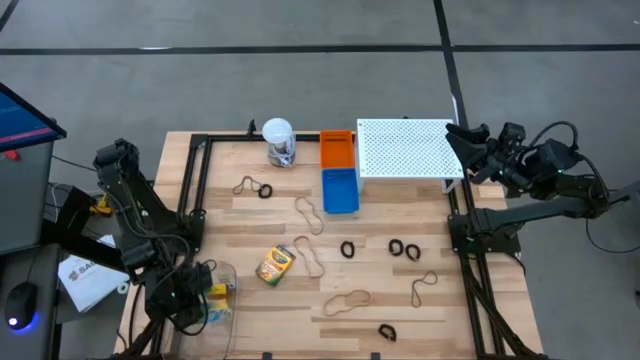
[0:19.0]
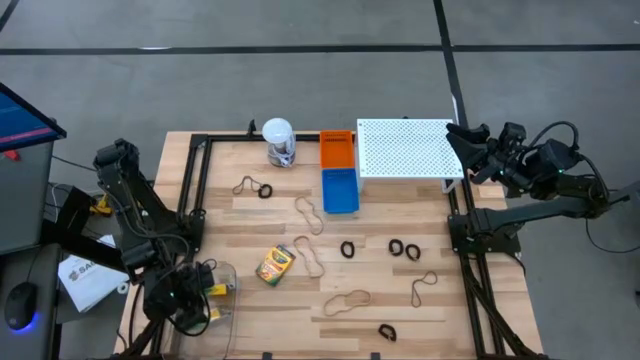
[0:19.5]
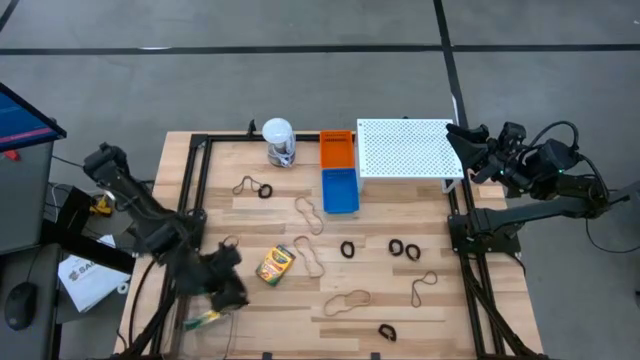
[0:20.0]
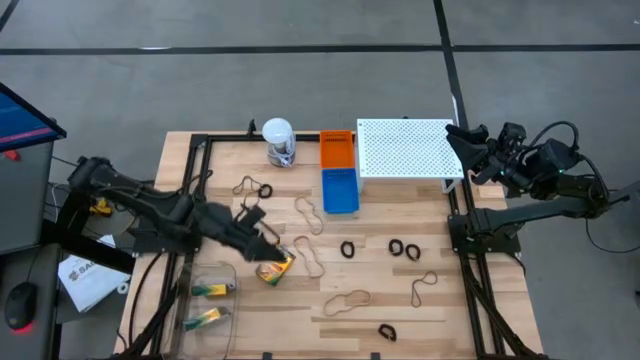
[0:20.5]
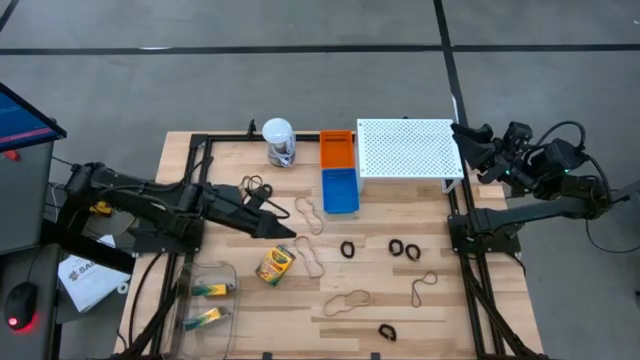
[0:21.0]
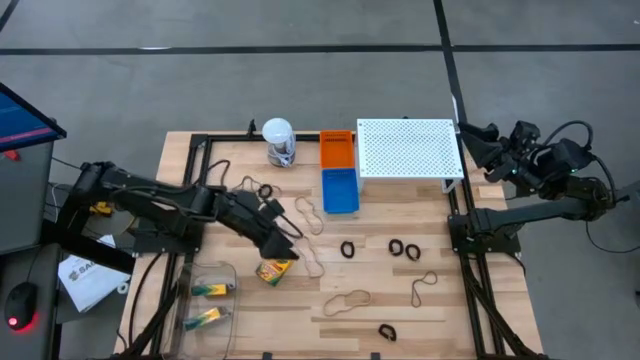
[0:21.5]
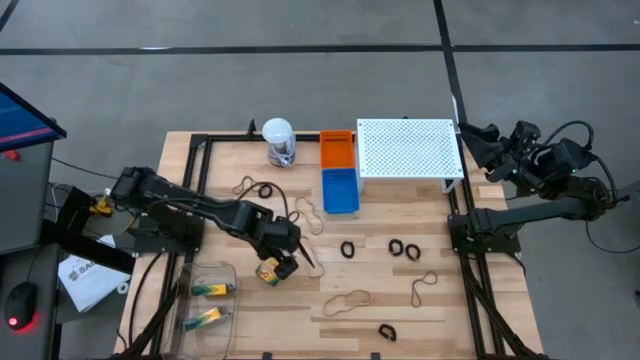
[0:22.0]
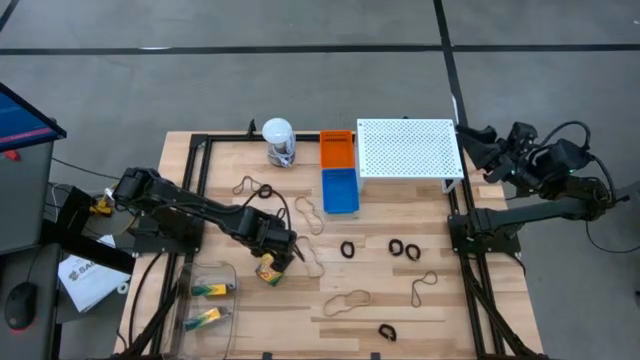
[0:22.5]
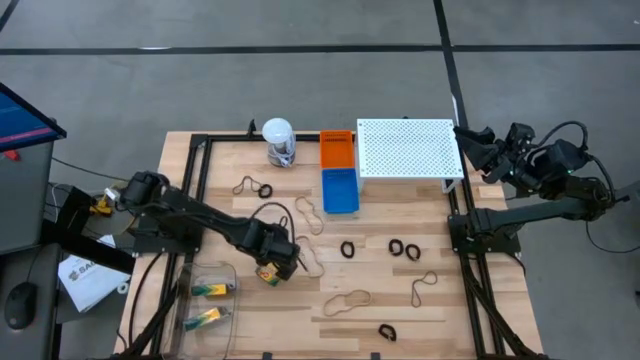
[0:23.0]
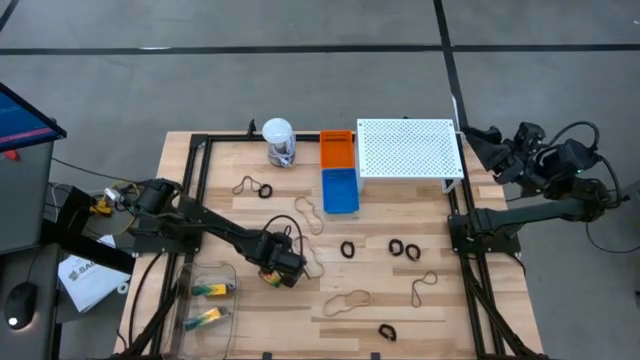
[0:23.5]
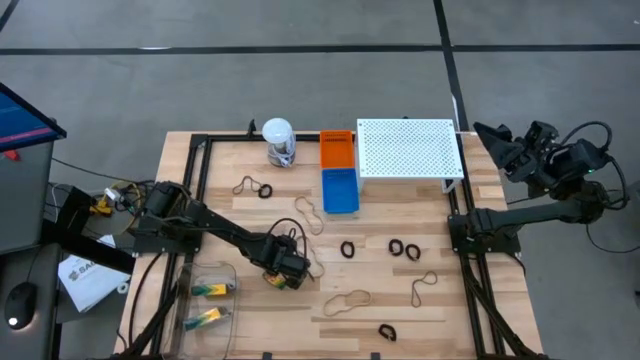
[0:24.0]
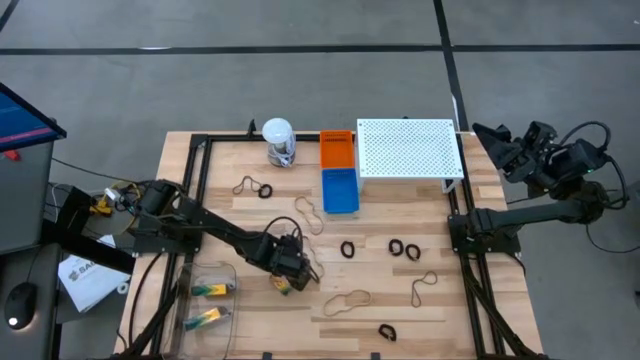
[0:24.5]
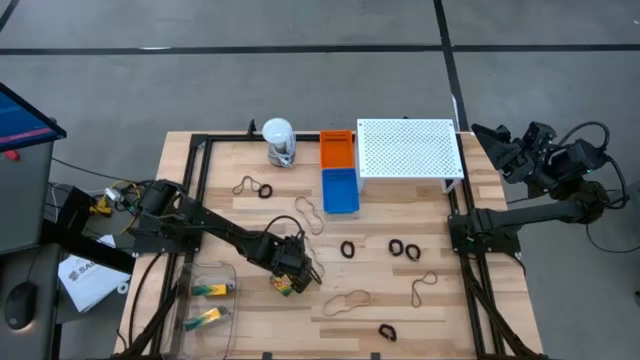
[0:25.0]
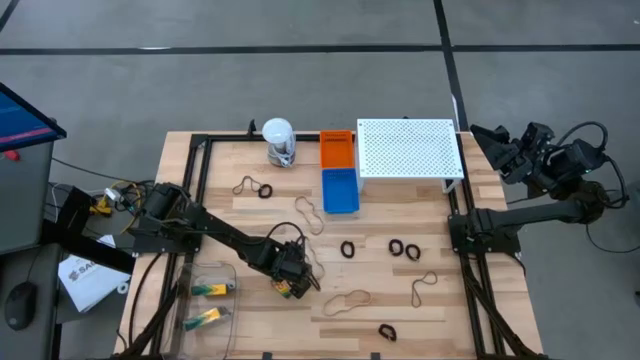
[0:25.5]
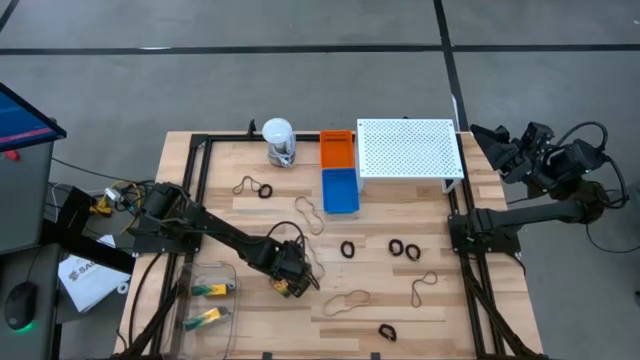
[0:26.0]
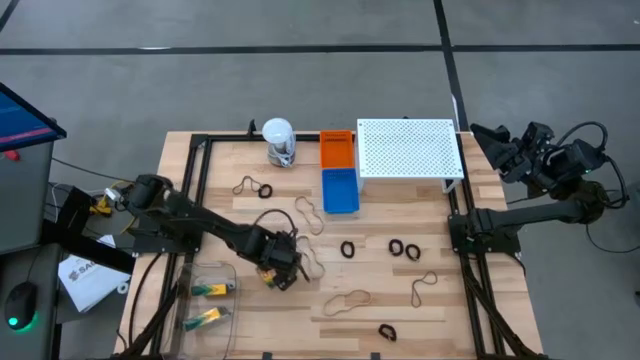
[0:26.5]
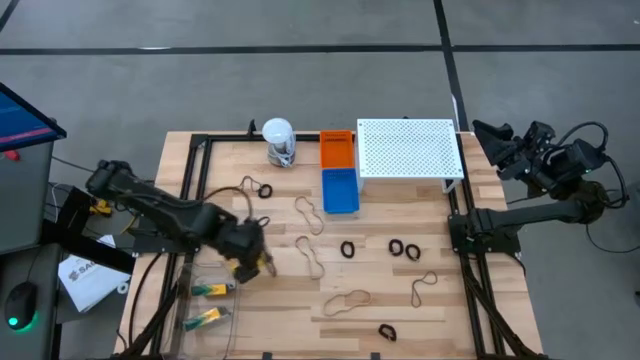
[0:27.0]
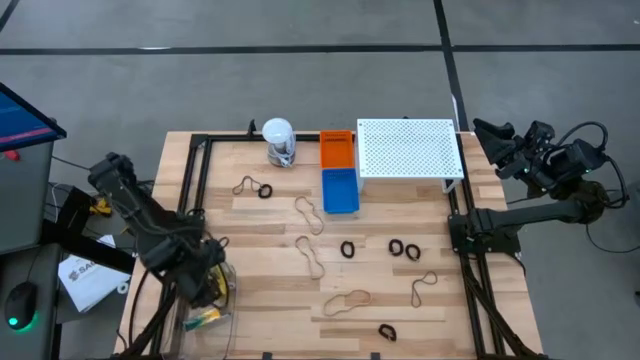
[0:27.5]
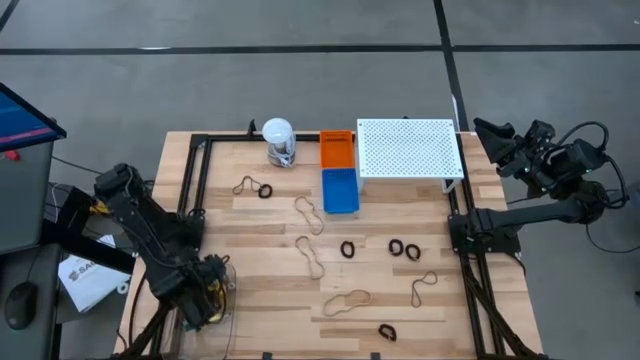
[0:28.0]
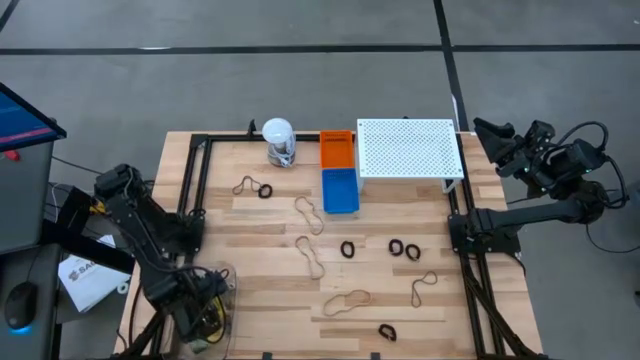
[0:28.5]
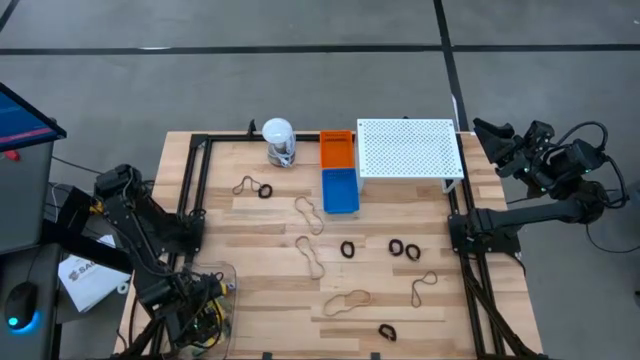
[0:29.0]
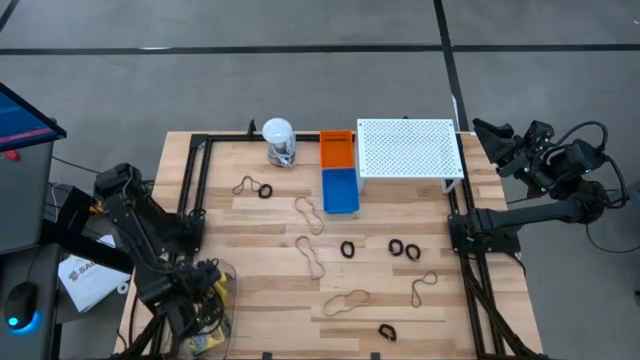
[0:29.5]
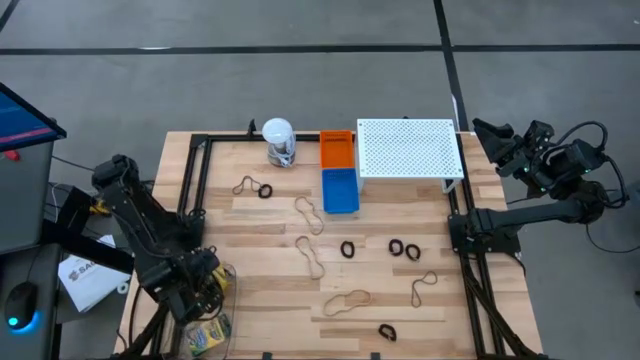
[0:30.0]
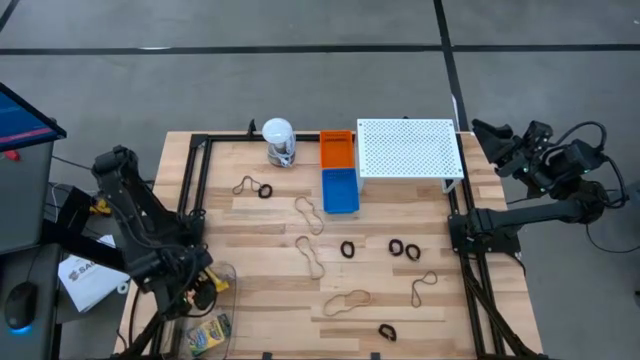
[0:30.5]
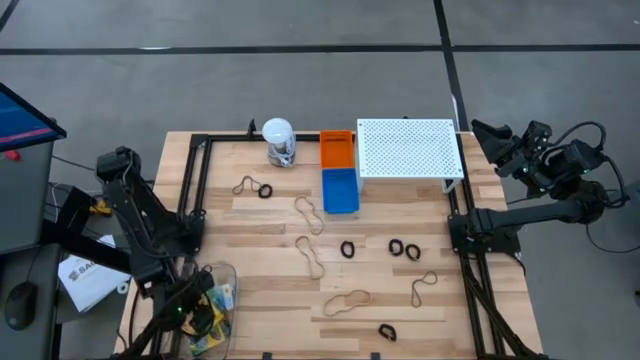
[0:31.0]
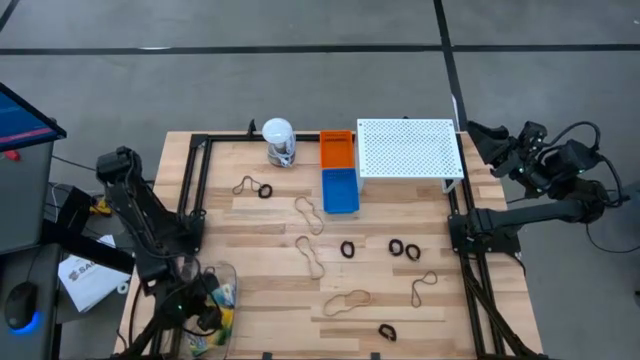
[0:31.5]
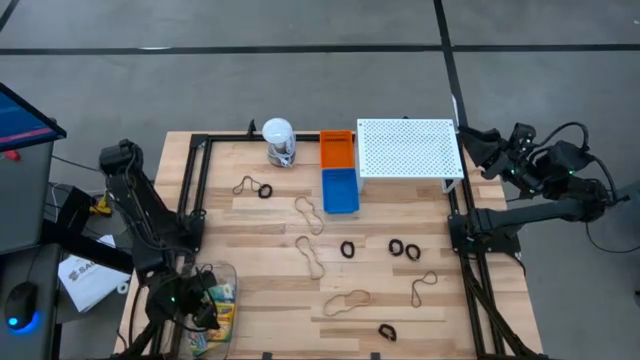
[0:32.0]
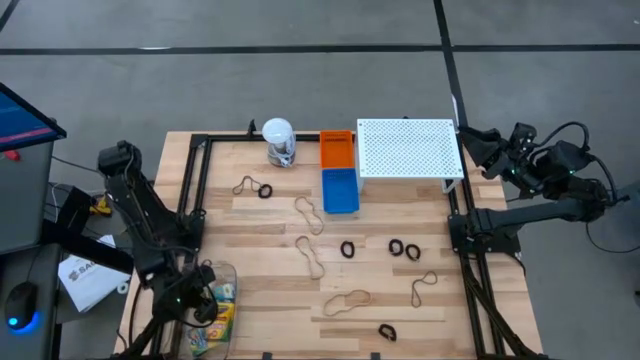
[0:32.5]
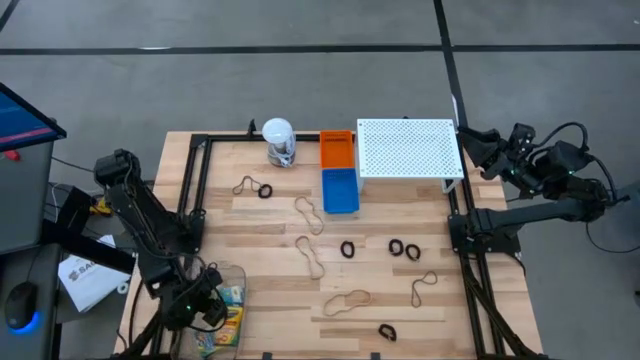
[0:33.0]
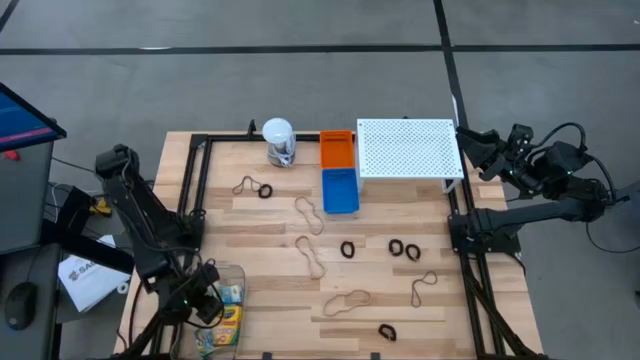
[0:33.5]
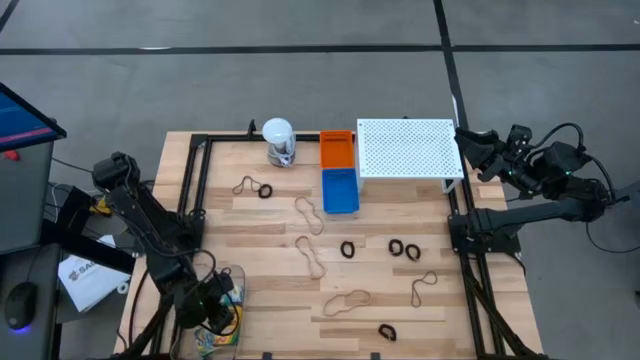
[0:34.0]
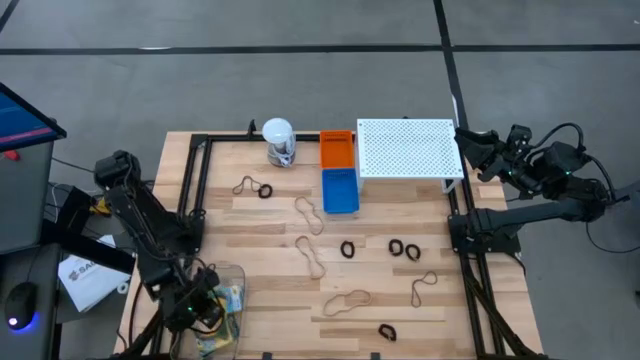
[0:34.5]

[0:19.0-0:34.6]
Task: Pick & Place Office Desk Supplies
Put the box of crayons into the transparent bin

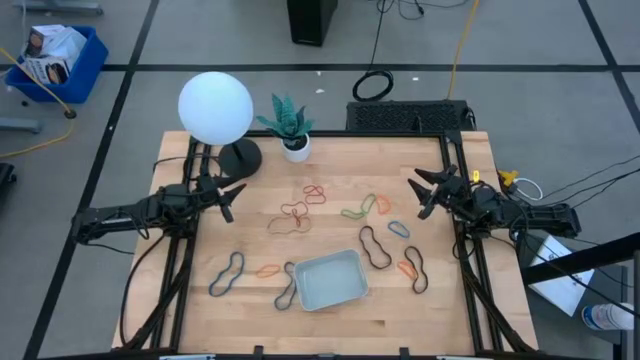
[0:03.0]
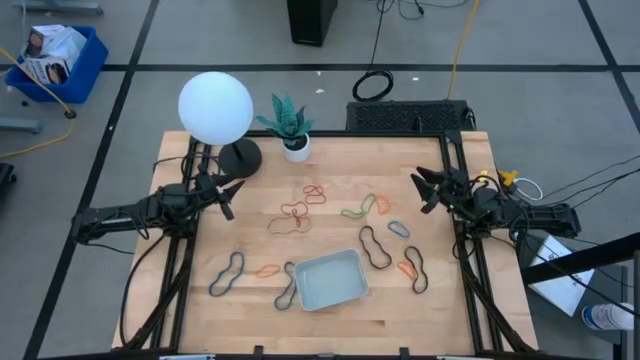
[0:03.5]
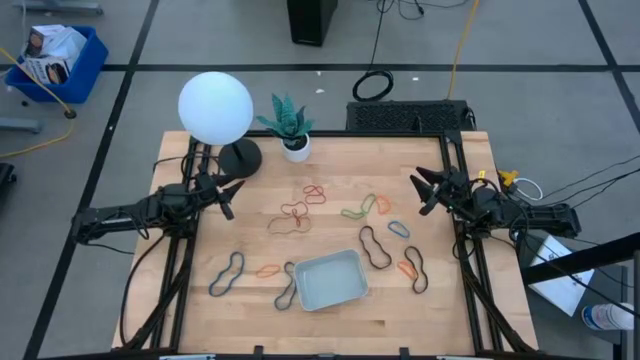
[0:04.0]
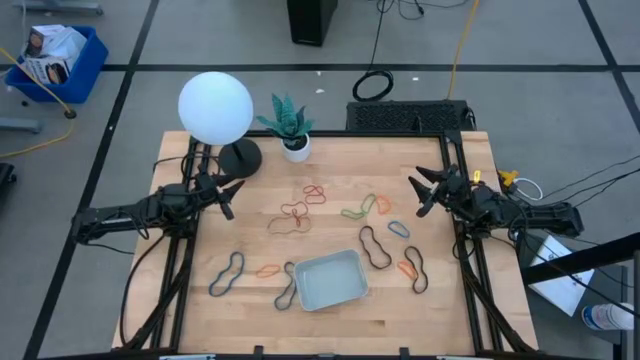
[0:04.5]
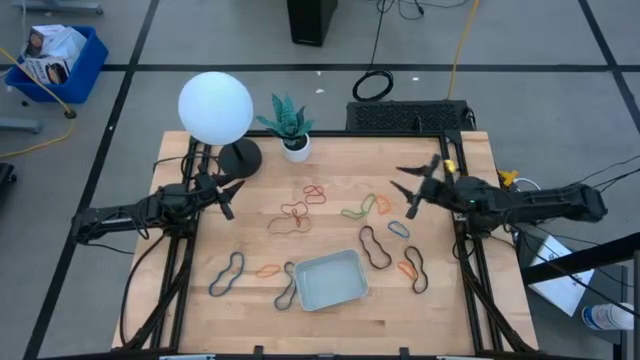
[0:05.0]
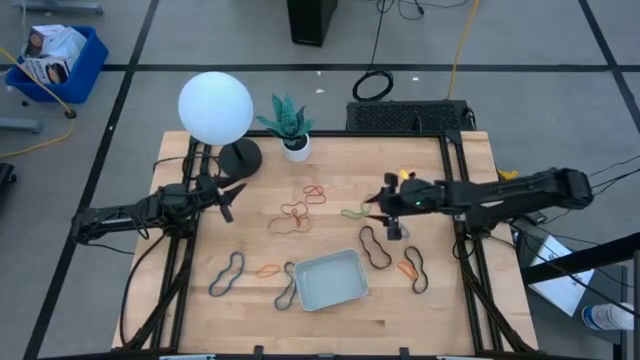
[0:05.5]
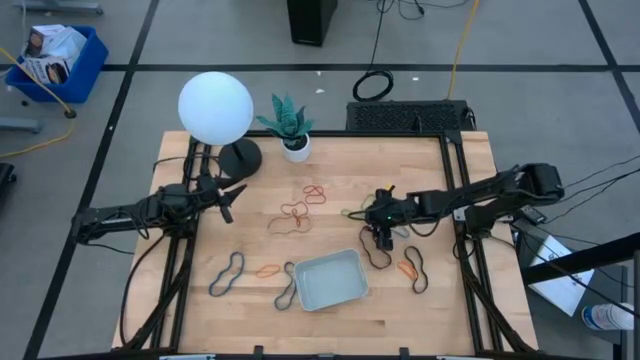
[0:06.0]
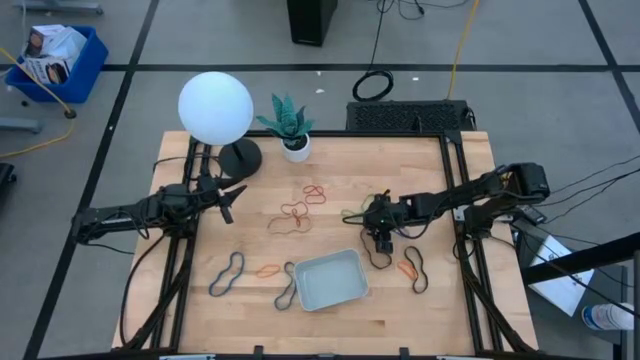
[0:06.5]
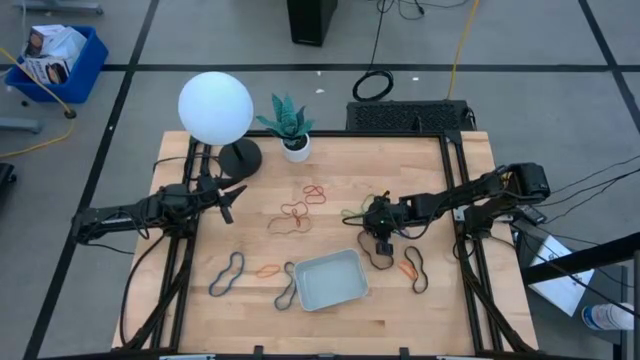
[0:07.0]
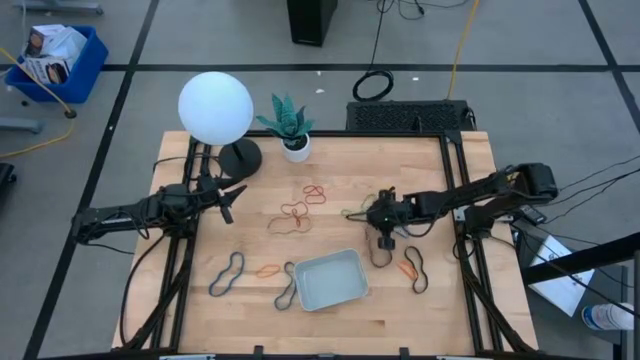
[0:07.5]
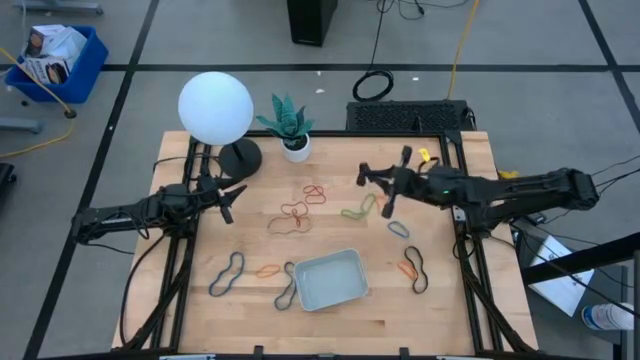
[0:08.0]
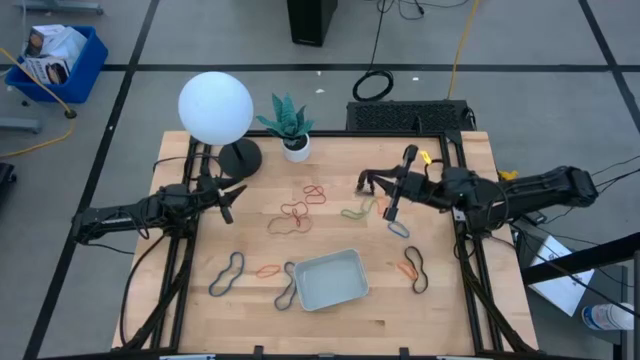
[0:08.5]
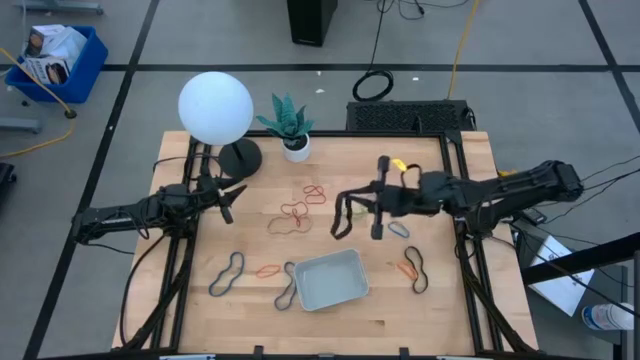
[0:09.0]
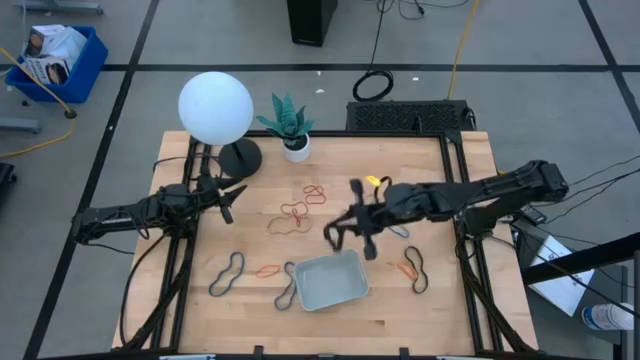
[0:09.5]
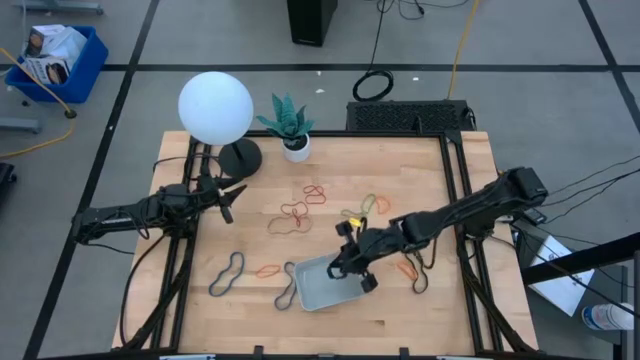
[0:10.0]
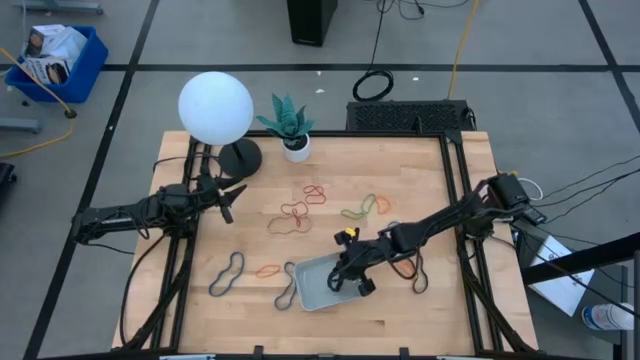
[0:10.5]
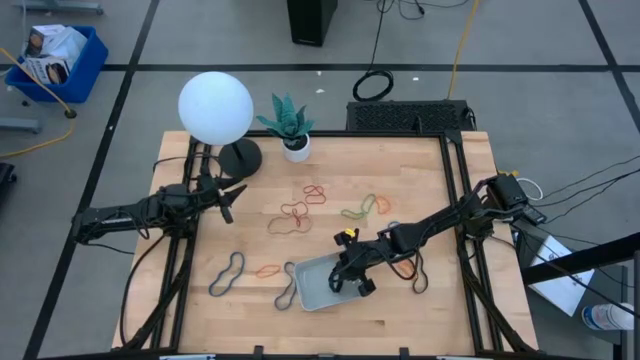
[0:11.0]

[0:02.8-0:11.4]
Task: Pick and place rubber bands into bin
Put the left black rubber band into the gray bin
